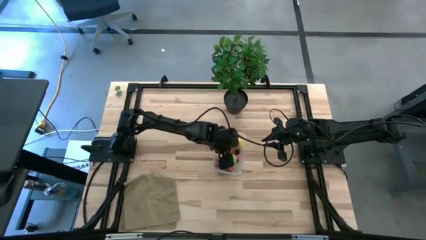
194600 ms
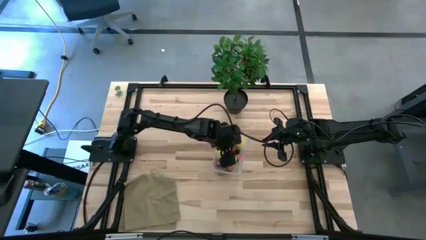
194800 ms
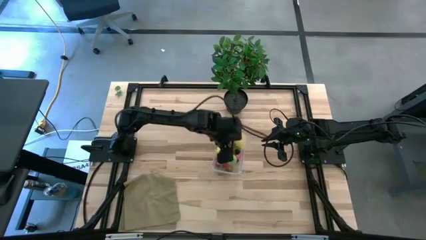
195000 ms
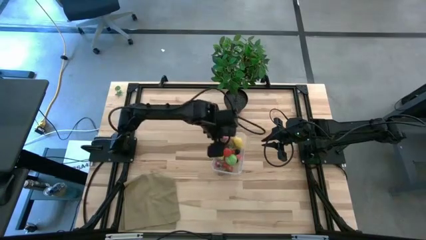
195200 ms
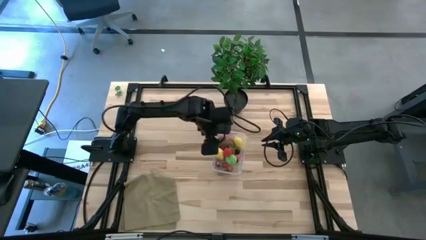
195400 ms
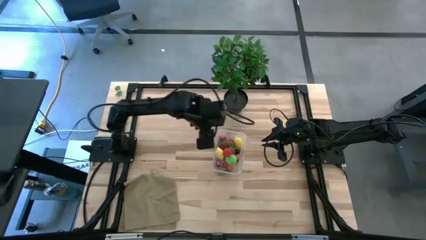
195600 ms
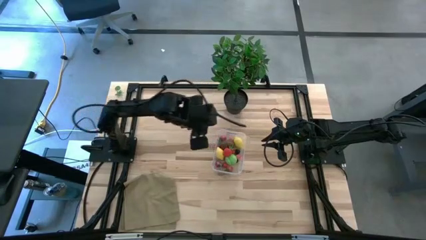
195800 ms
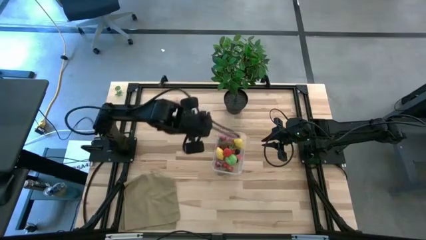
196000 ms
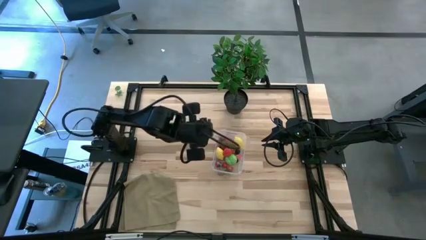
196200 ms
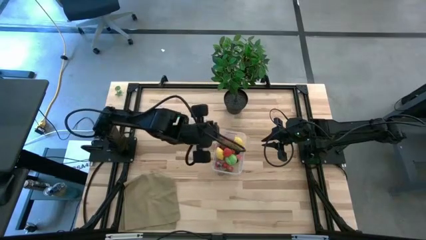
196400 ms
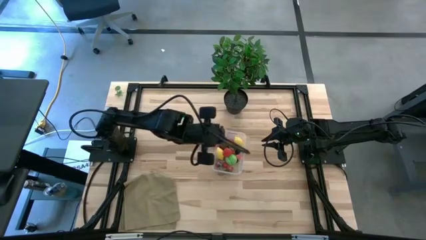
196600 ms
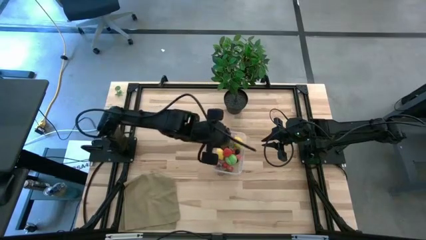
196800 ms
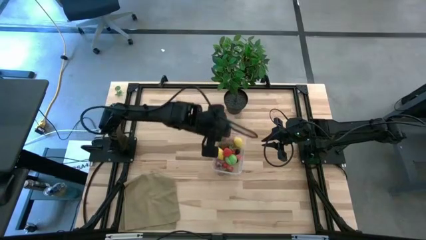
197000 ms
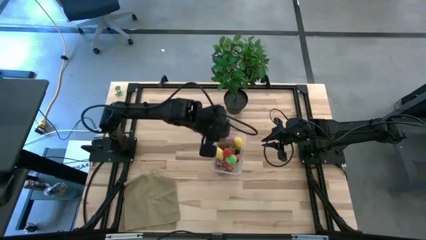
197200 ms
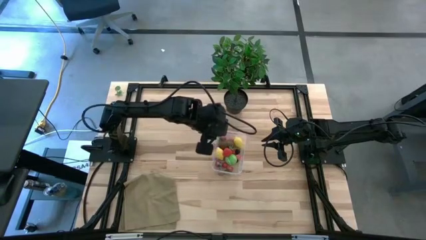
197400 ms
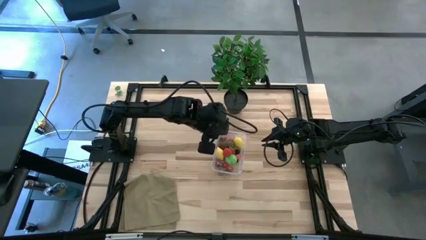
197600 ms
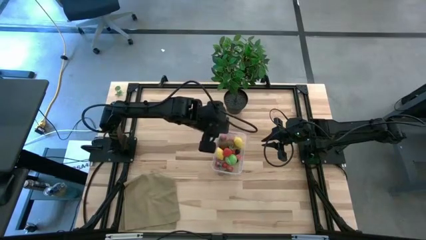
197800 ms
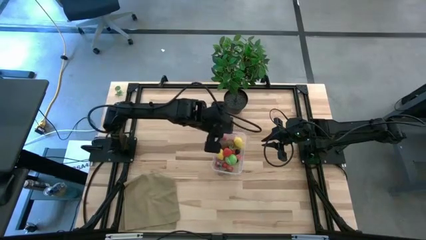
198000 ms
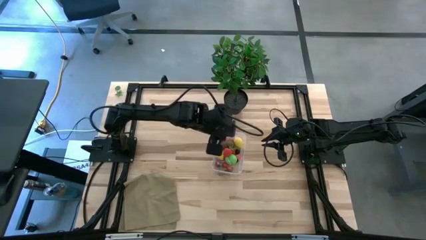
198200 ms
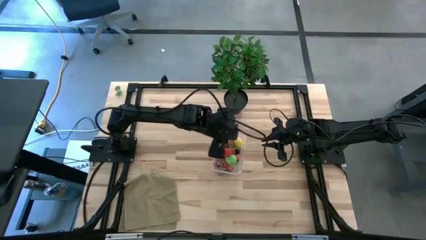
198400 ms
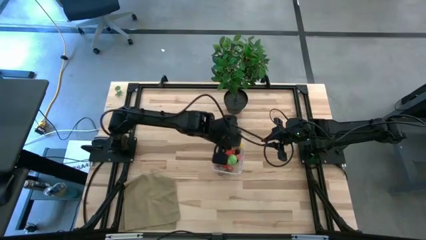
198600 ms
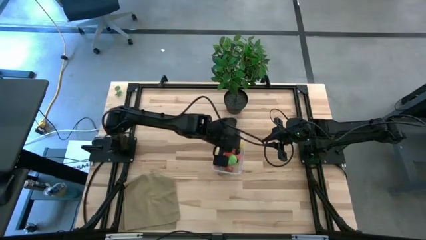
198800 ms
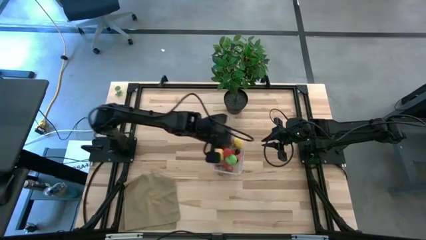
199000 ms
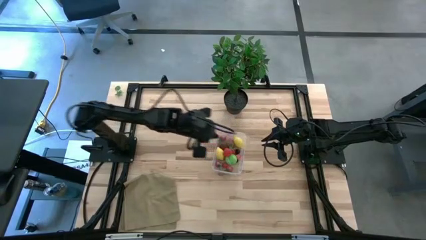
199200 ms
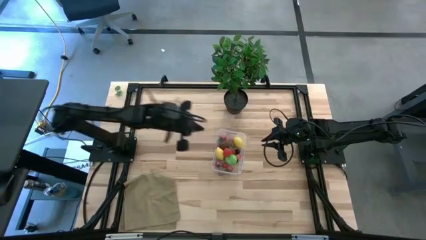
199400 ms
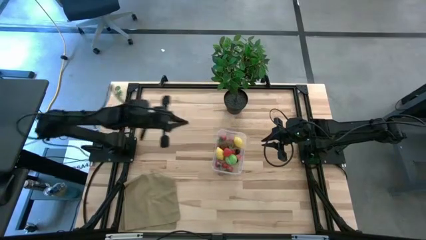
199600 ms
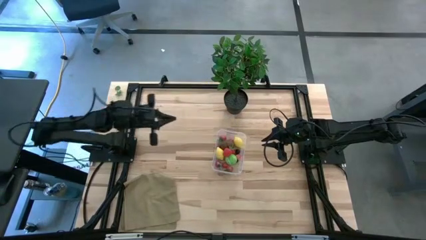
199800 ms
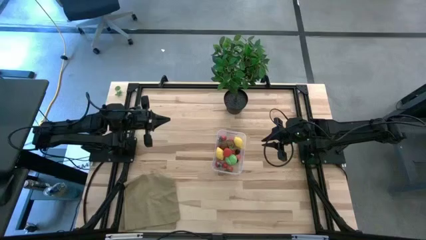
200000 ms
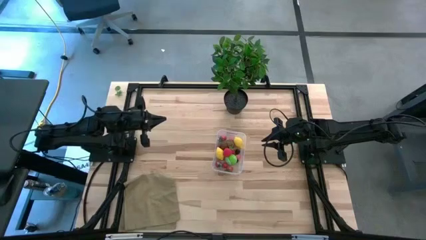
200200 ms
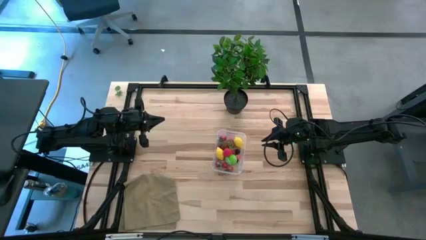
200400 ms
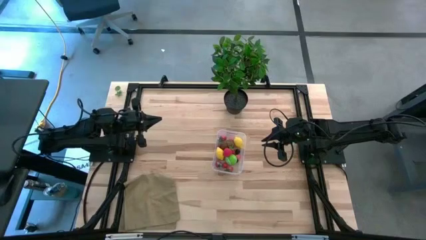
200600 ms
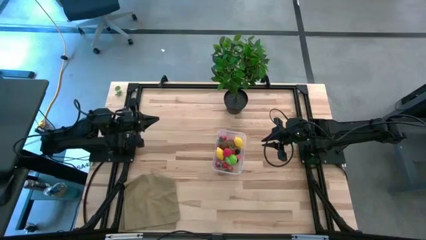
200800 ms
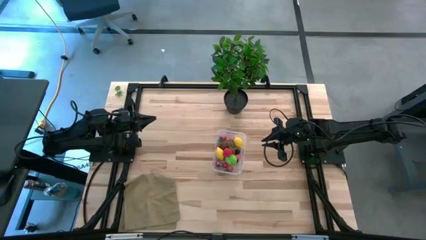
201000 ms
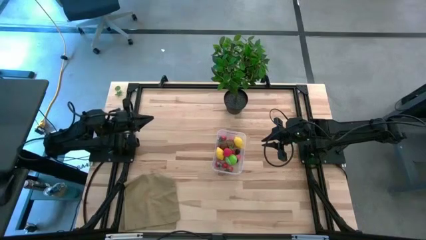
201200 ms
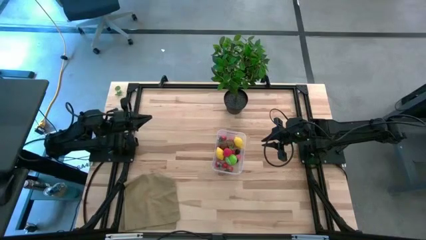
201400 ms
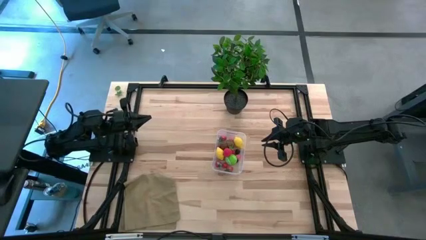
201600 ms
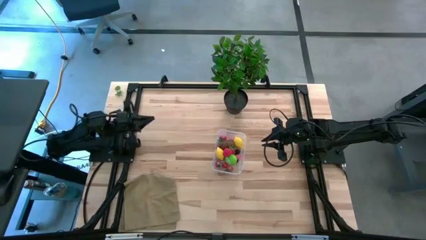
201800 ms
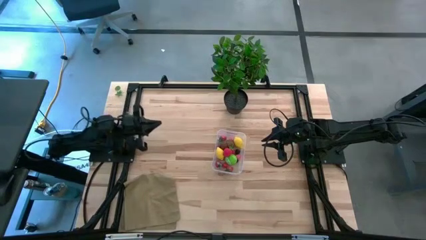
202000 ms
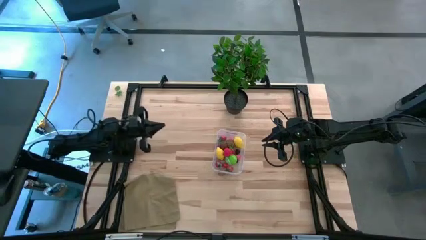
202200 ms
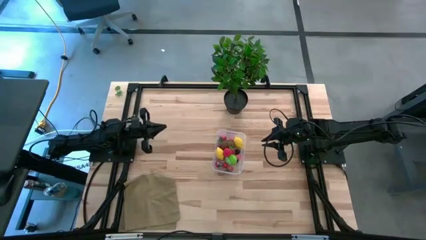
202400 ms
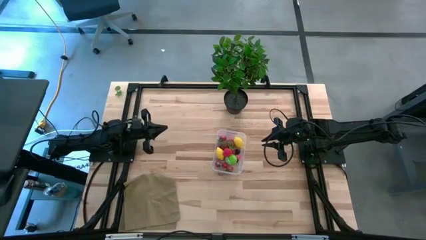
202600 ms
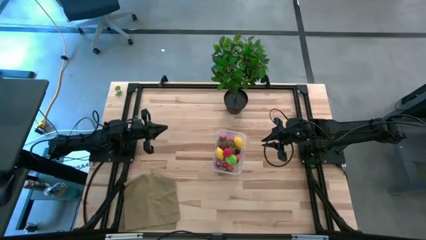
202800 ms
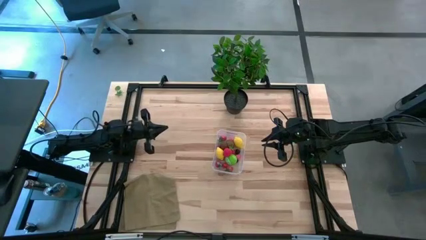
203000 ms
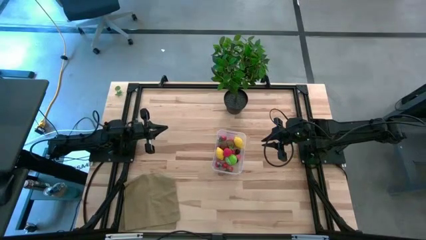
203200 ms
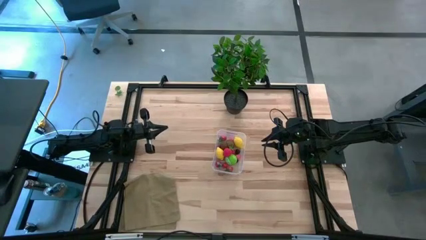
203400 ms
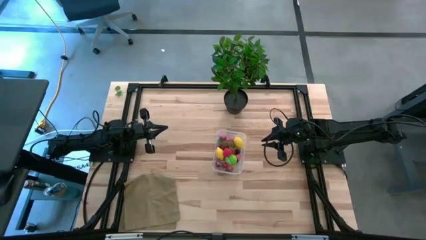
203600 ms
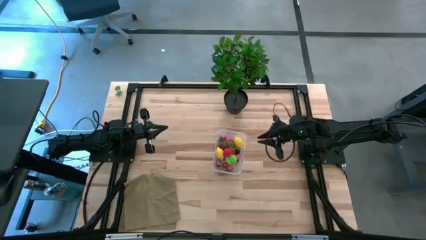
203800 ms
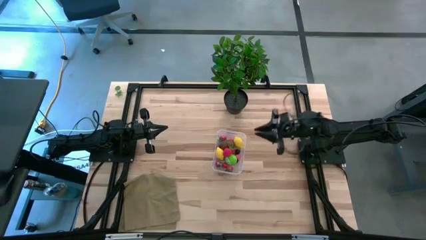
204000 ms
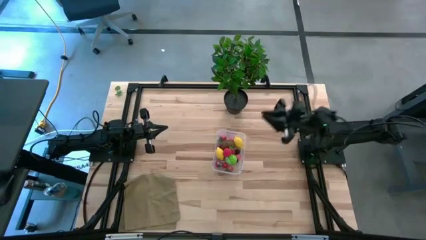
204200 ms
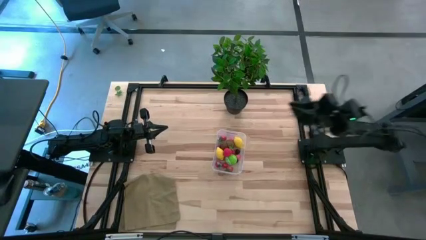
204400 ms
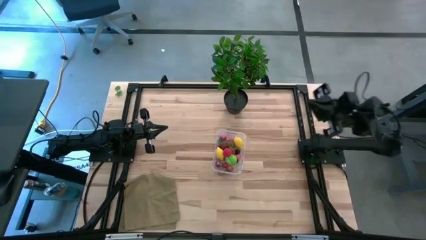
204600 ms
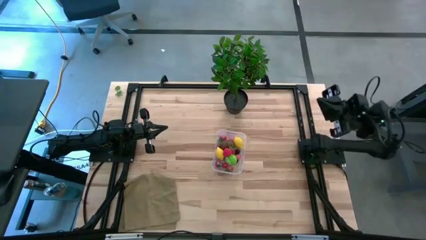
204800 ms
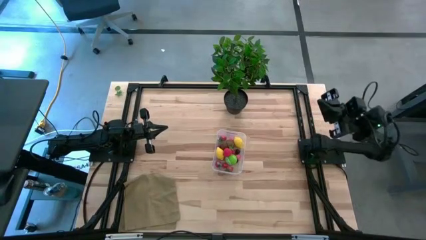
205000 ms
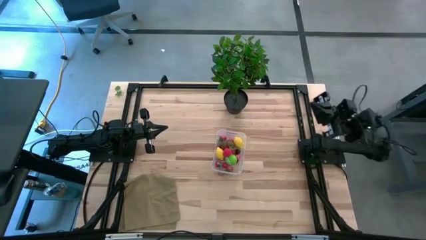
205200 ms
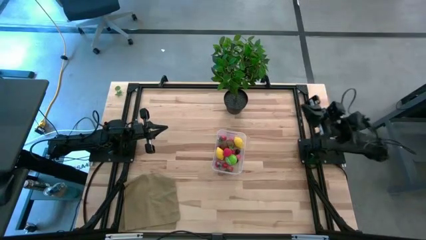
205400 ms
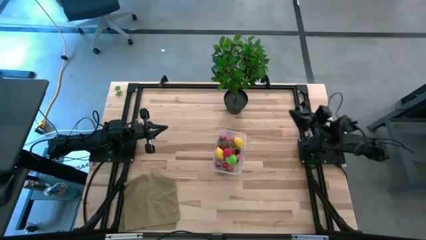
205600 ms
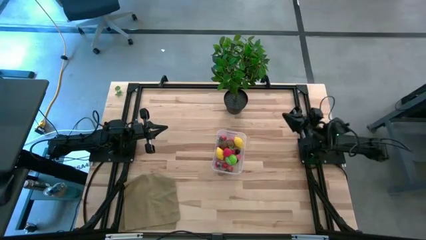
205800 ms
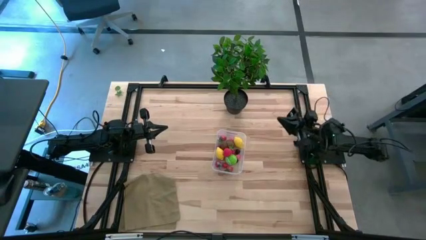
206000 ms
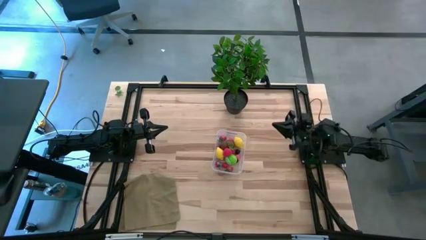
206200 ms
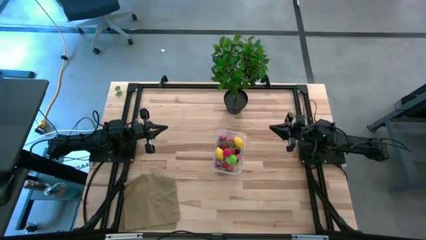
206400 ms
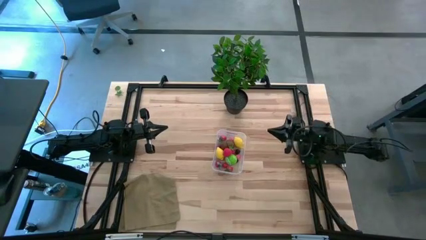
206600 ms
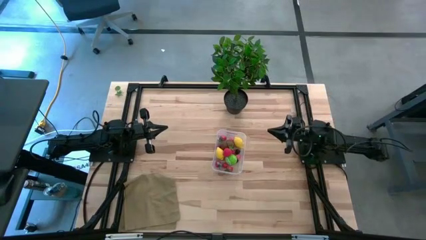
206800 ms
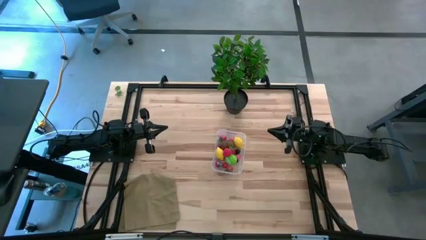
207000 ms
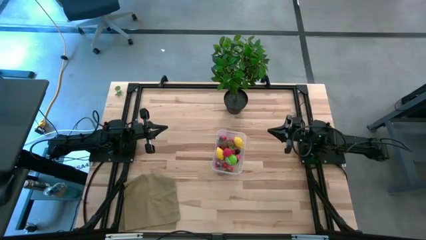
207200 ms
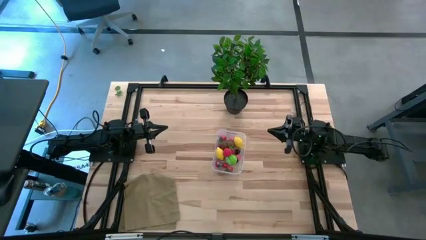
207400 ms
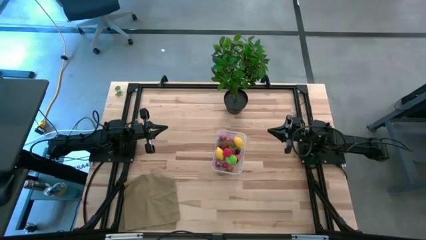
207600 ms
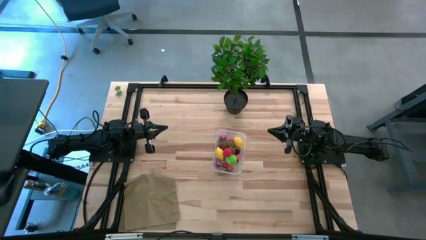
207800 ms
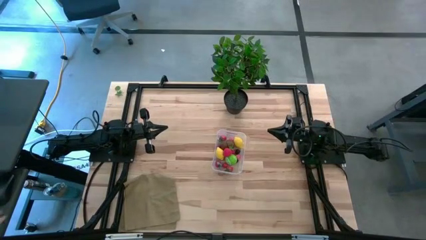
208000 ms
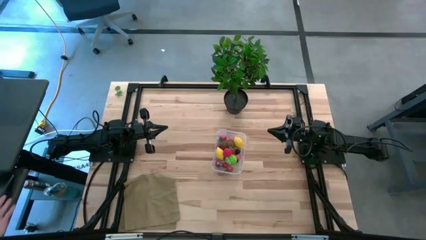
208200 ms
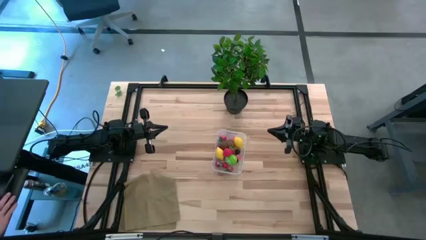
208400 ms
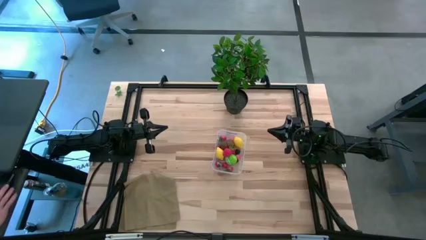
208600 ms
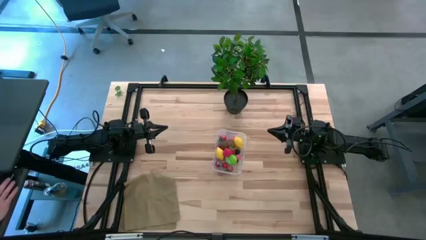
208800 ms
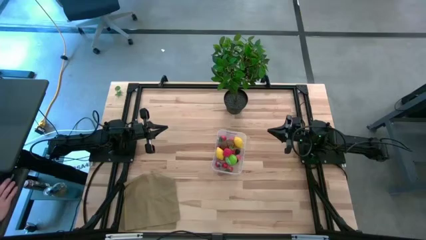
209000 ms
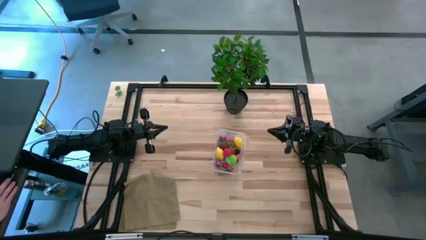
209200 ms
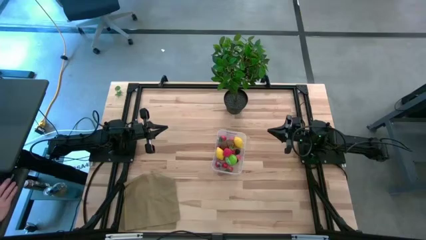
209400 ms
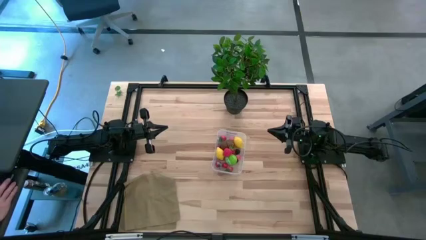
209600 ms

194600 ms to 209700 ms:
Task: Pick and placing Produce into tupperware
Return to Home Position

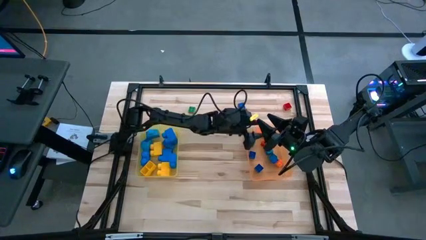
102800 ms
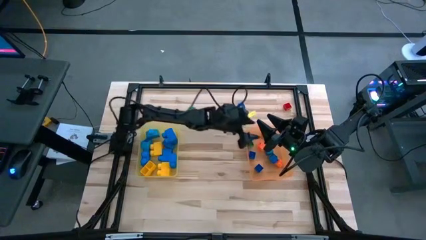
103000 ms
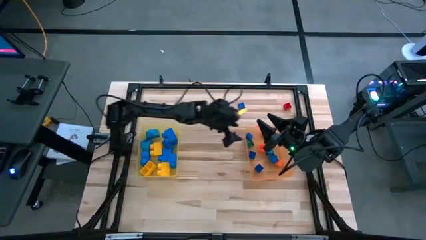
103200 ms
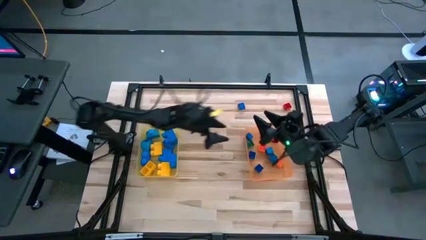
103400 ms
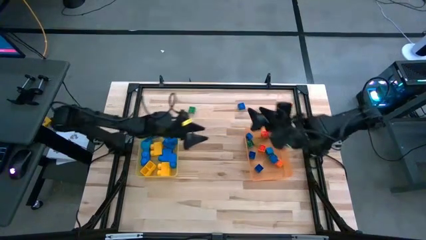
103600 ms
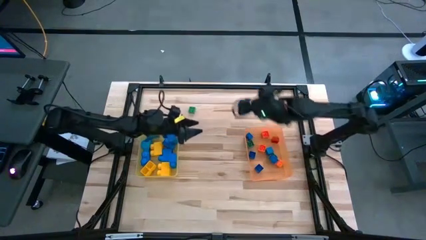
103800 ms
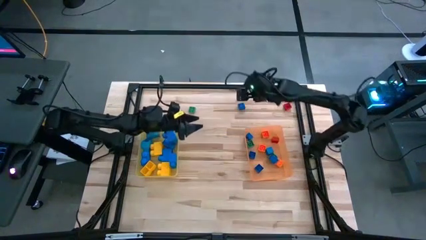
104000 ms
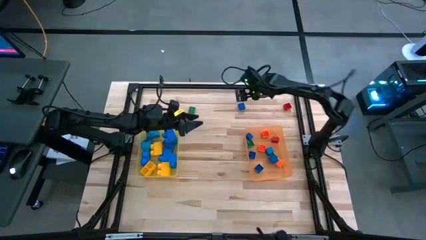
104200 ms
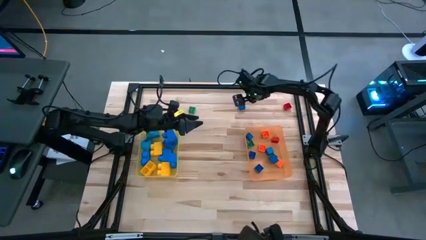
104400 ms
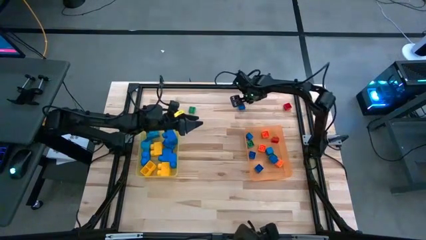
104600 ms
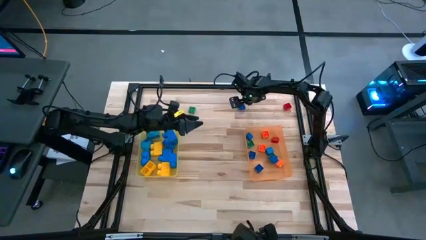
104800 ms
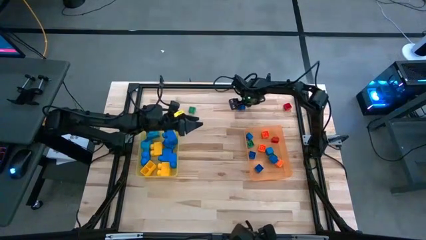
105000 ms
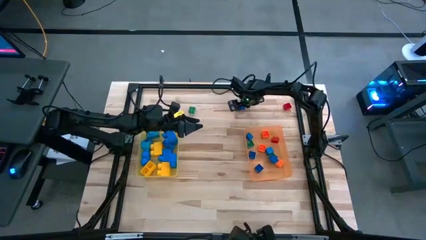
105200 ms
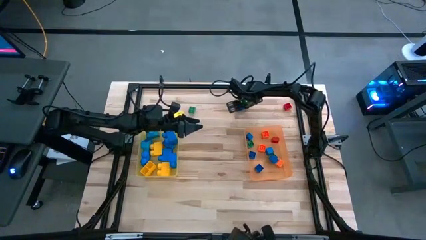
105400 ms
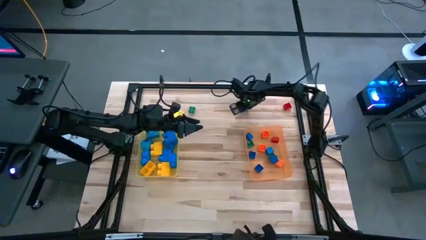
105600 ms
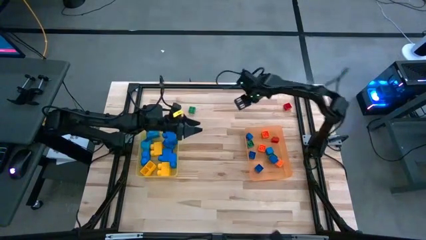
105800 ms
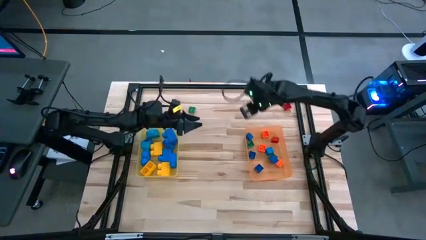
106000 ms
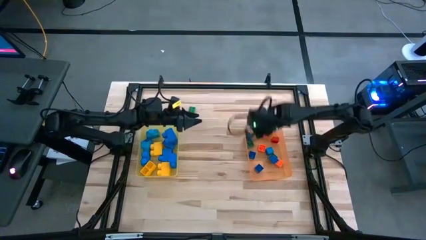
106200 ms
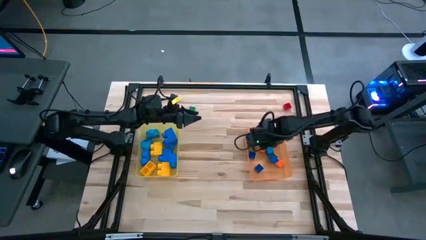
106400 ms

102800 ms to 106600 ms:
Task: Sort blocks by size
Put the small blue game piece into the orange bin
